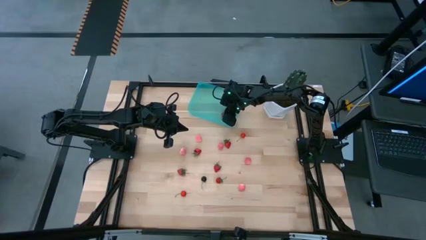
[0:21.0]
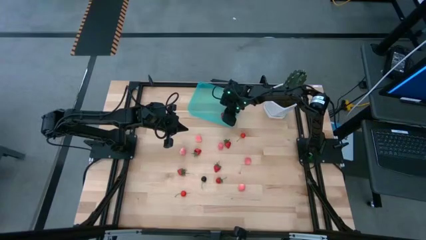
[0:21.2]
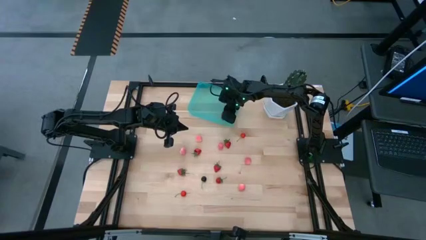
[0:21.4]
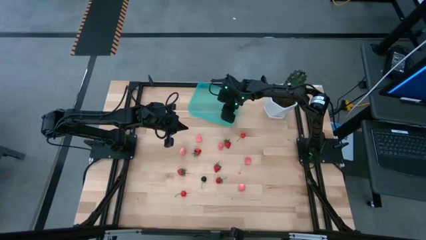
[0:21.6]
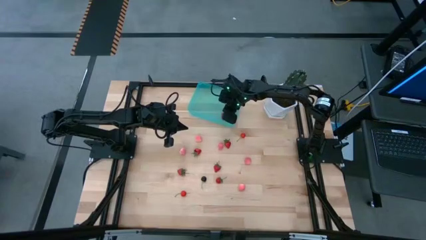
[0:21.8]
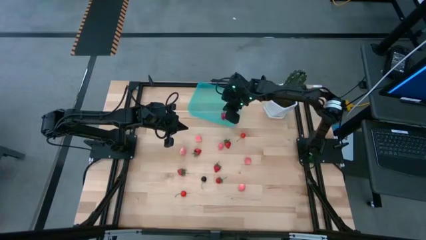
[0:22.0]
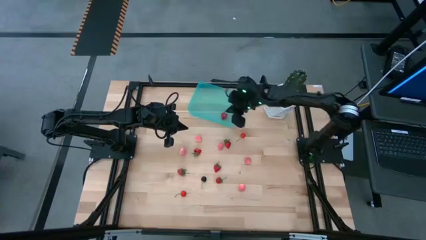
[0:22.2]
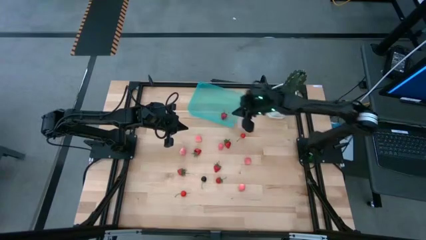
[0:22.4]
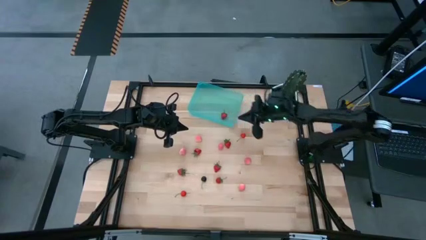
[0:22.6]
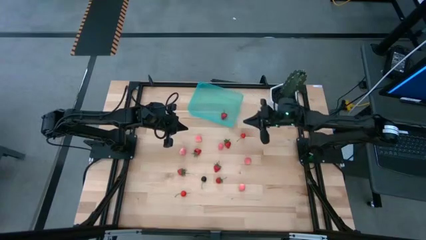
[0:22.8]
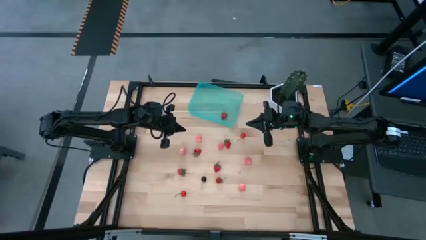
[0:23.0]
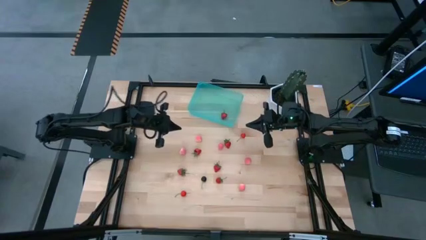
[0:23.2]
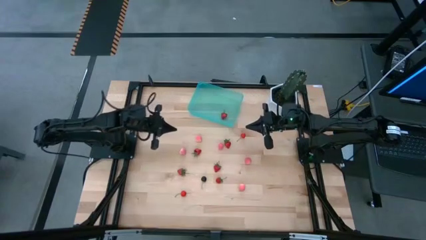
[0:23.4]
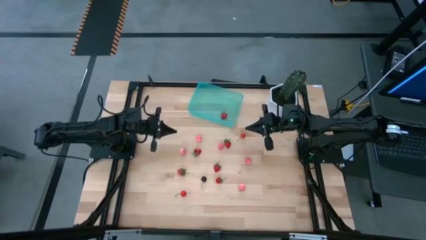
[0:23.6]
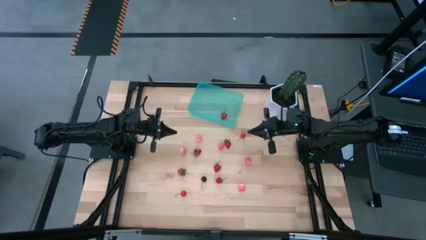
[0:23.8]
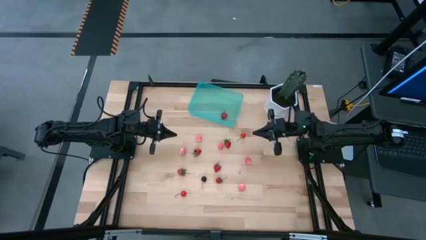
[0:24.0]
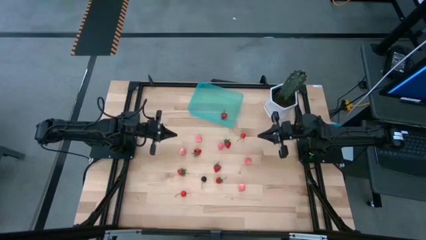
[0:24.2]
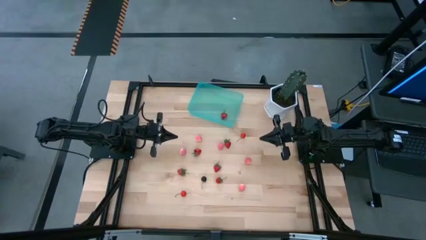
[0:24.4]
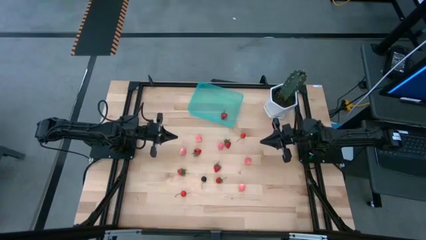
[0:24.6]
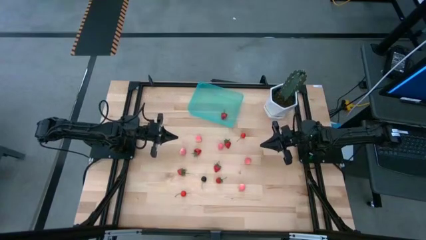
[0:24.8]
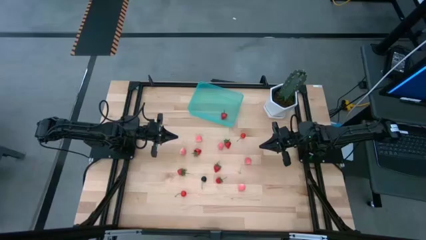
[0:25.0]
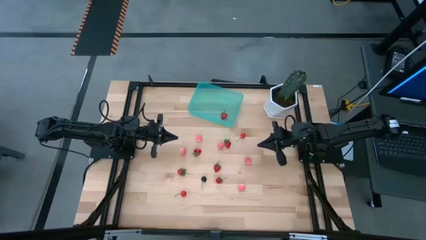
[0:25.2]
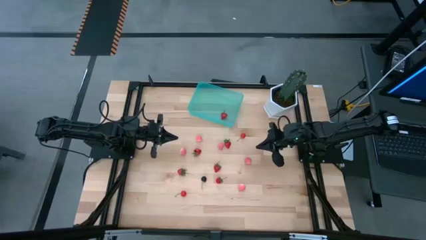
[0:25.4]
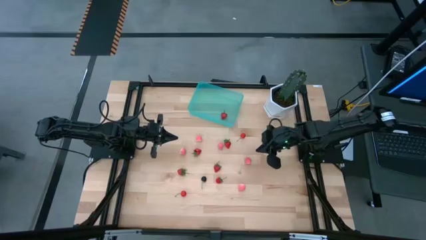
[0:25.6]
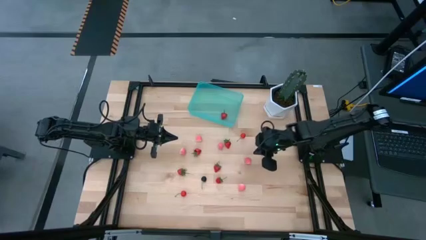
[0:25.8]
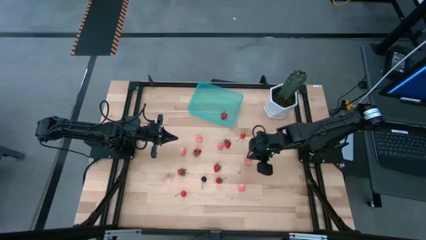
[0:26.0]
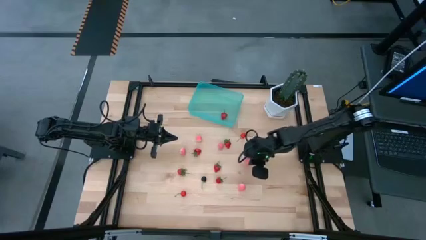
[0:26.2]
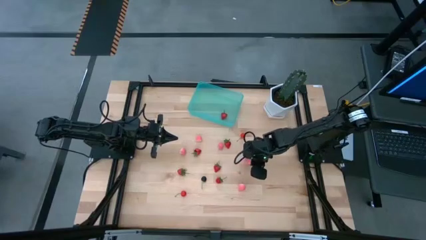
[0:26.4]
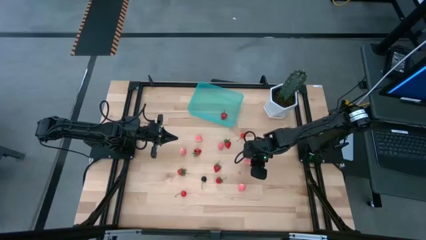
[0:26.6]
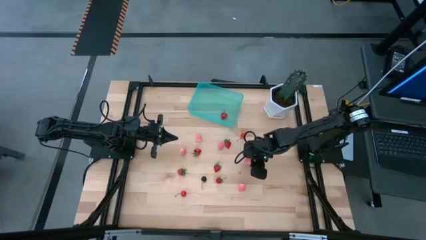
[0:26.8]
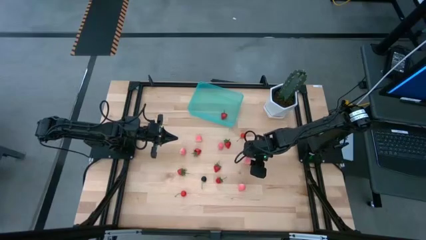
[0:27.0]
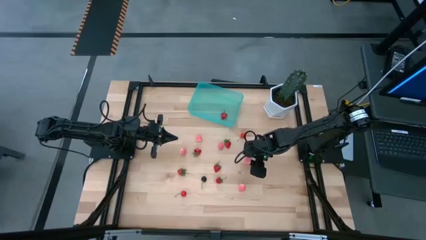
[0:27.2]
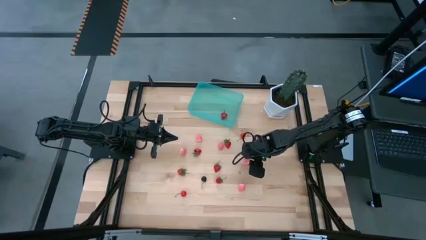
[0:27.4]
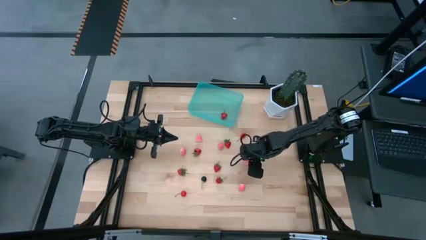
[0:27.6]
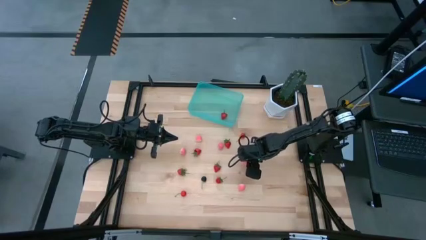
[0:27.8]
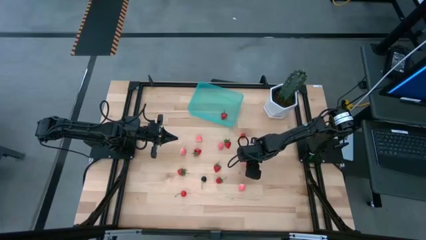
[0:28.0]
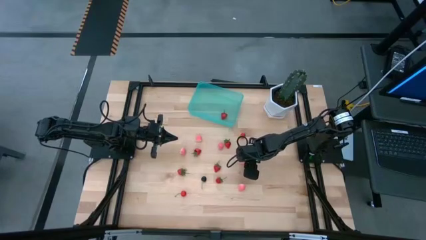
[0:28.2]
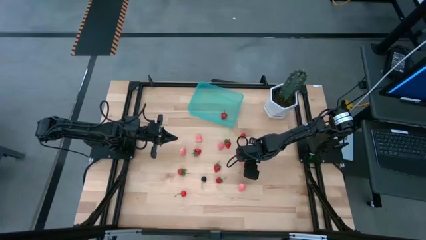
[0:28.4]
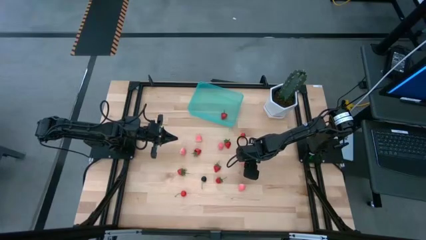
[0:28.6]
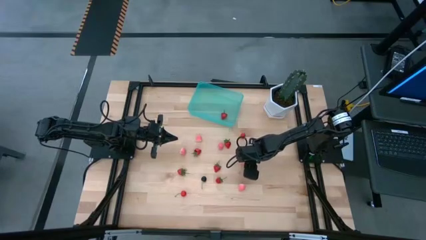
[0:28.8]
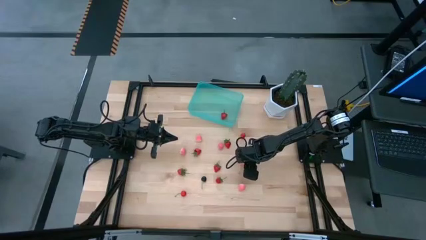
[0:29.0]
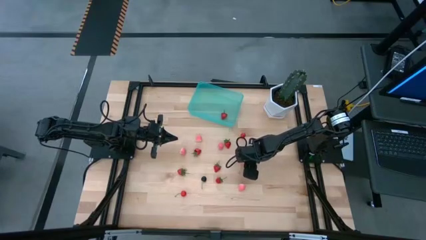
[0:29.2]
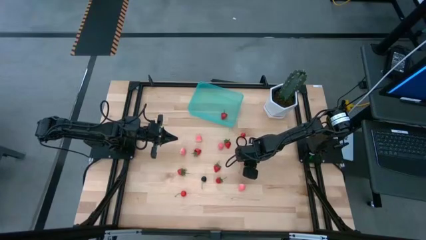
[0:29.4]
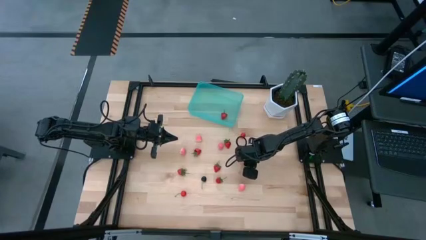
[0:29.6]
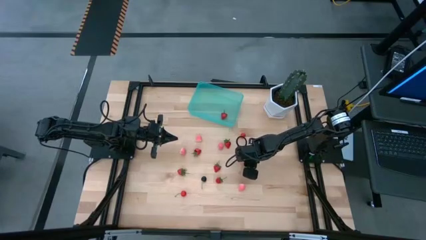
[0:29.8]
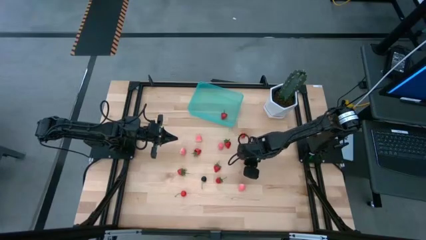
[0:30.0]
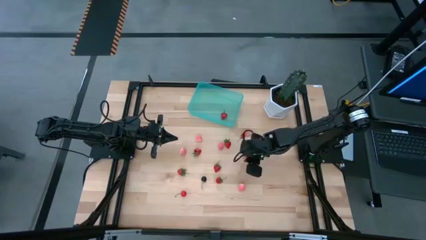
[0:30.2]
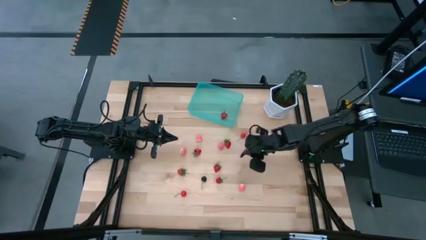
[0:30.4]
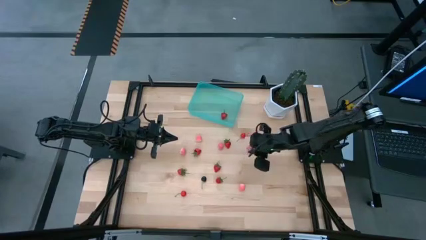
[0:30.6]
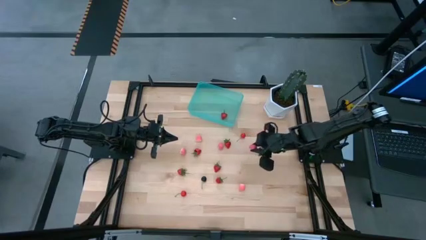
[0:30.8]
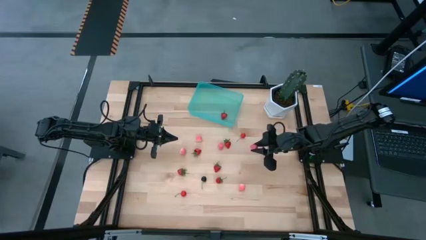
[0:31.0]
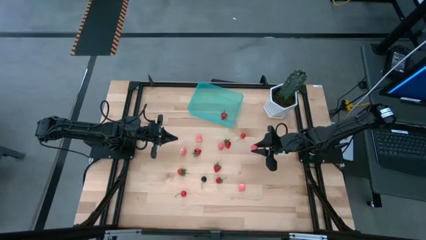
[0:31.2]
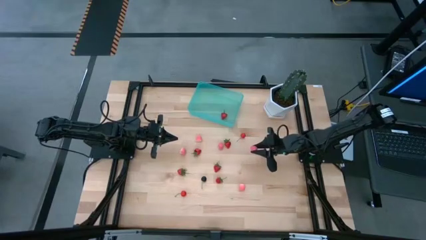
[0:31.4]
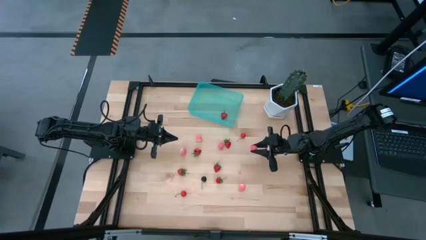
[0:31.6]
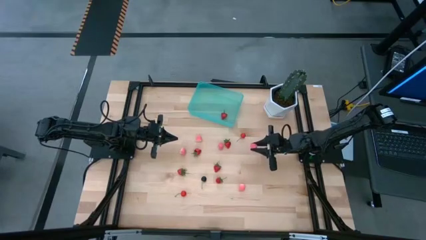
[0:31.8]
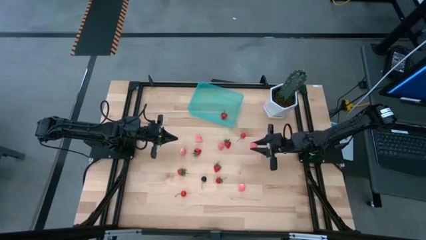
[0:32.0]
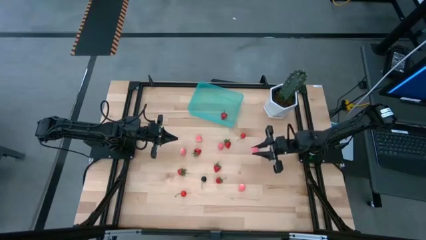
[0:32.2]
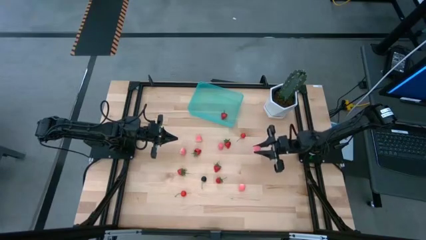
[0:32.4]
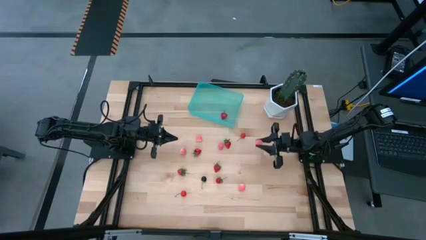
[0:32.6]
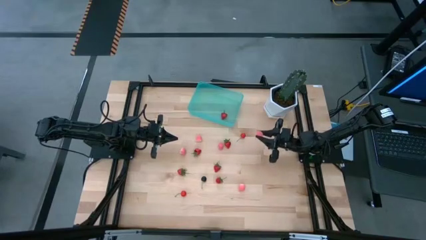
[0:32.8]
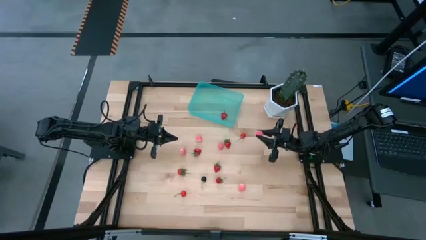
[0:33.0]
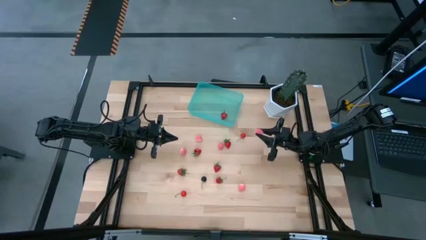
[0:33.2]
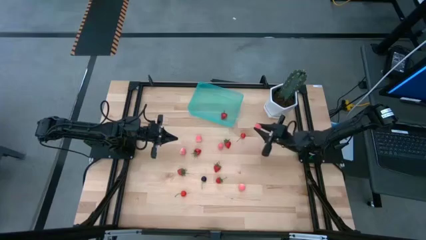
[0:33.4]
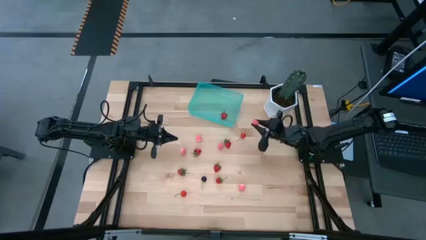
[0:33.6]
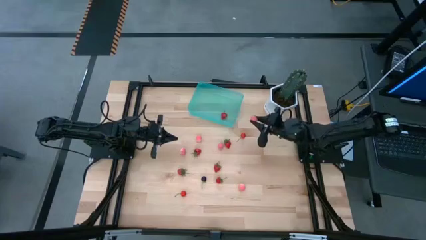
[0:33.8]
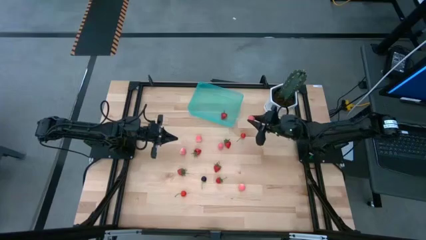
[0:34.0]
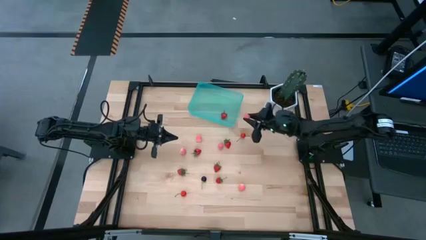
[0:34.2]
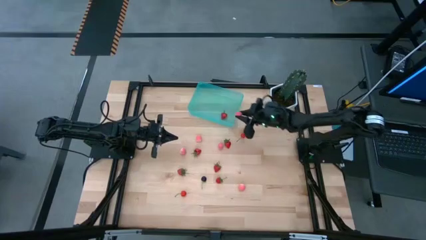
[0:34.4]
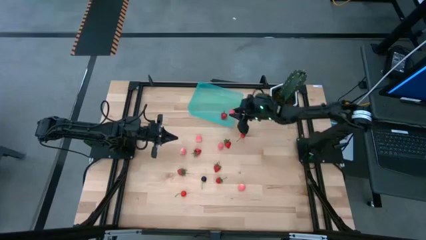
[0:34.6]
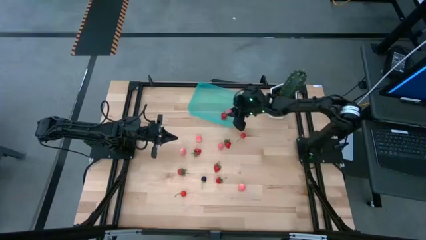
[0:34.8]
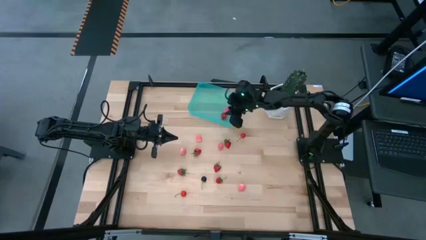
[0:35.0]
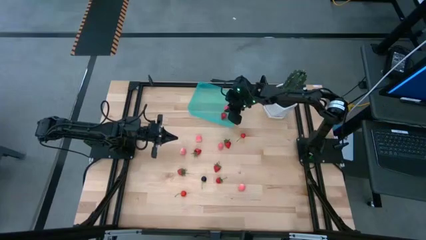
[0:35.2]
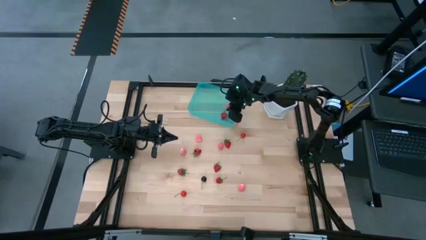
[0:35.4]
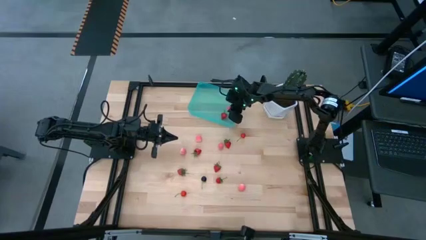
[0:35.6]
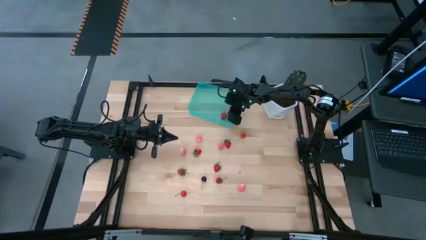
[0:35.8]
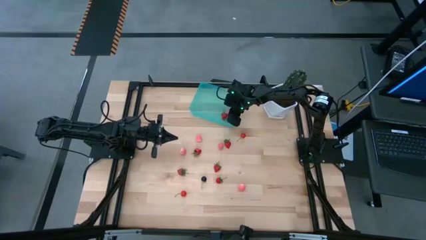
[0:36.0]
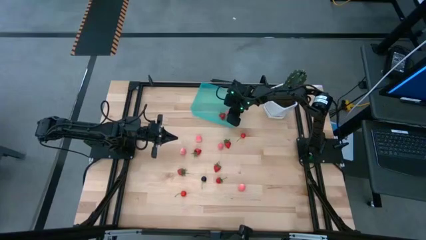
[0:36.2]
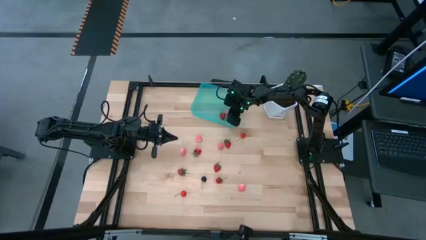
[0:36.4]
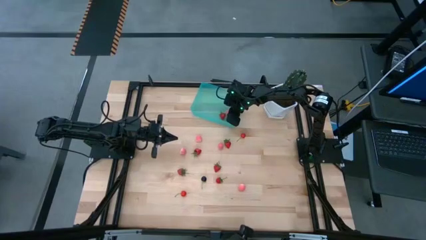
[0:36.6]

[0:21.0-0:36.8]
Task: Pick and placing Produce into tupperware
Put the pink peach into the light blue bin
